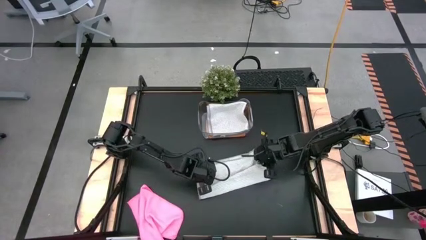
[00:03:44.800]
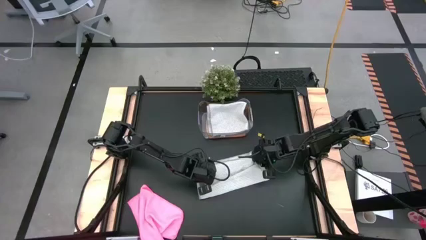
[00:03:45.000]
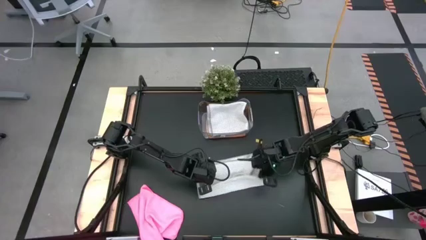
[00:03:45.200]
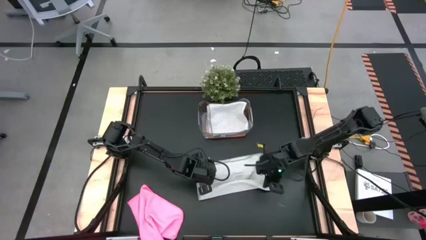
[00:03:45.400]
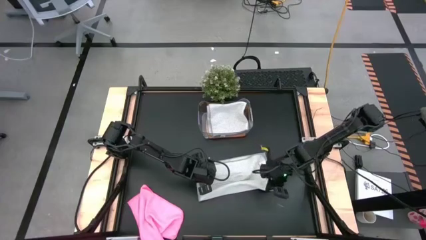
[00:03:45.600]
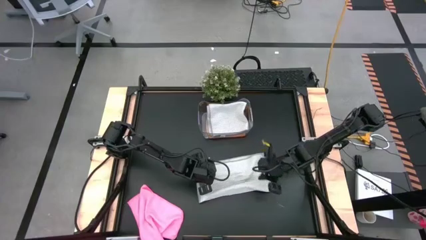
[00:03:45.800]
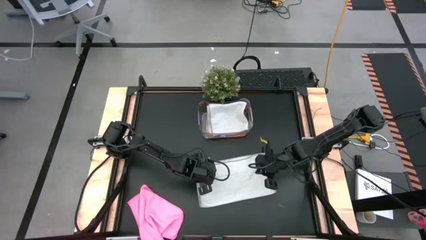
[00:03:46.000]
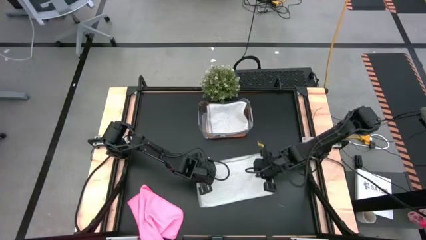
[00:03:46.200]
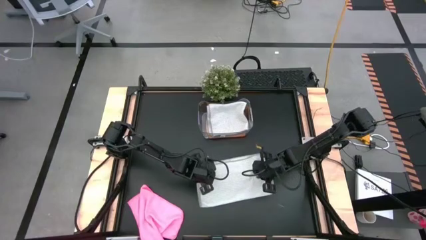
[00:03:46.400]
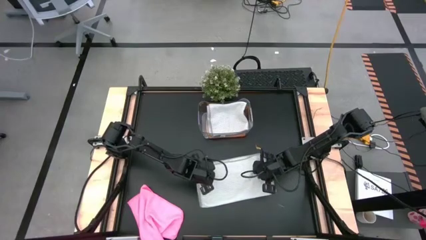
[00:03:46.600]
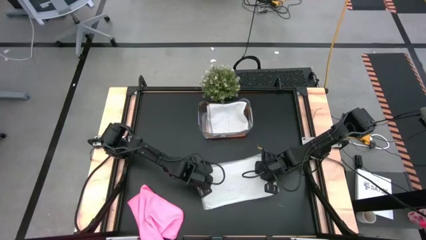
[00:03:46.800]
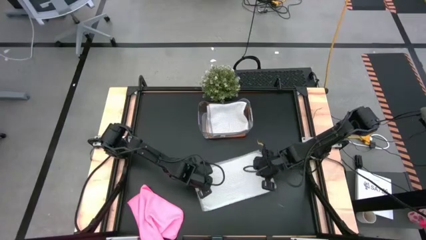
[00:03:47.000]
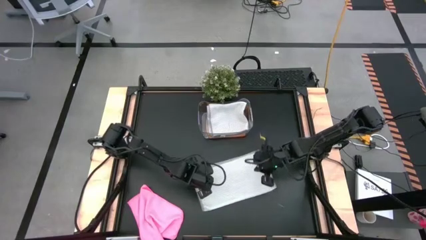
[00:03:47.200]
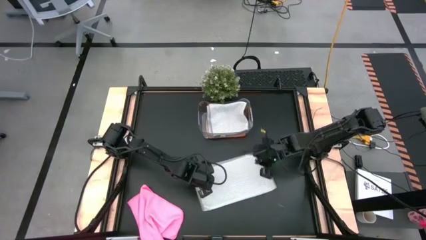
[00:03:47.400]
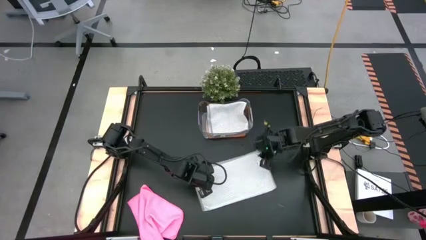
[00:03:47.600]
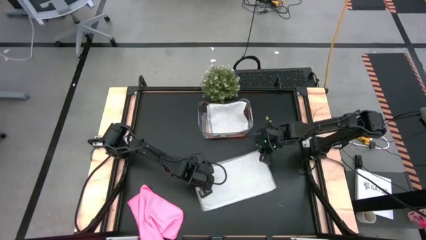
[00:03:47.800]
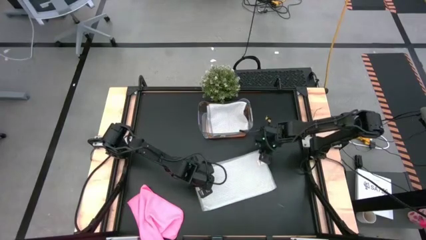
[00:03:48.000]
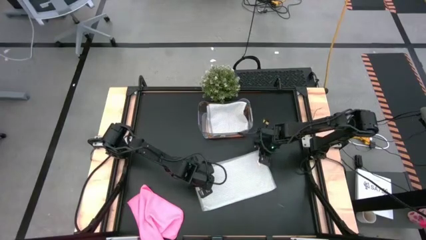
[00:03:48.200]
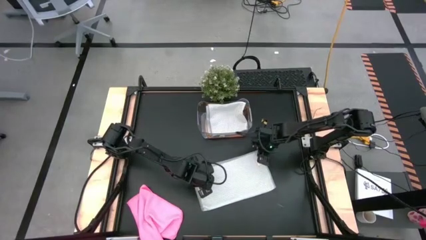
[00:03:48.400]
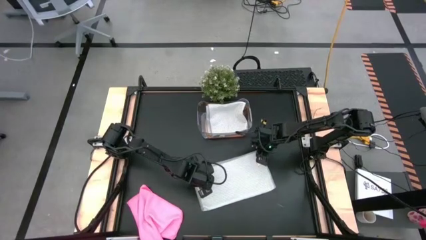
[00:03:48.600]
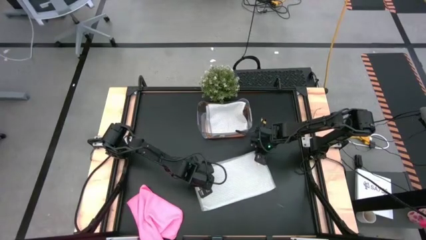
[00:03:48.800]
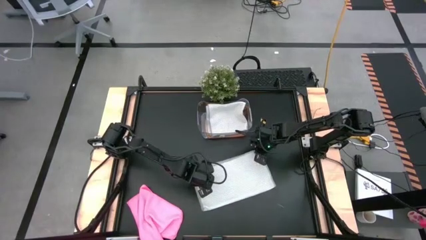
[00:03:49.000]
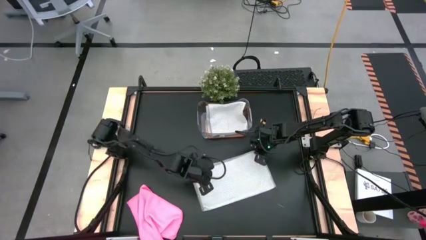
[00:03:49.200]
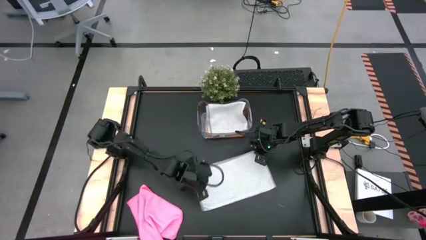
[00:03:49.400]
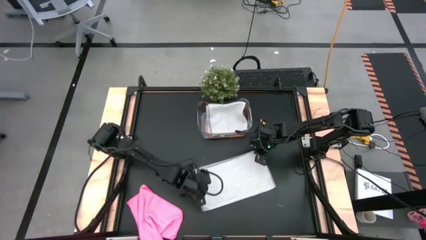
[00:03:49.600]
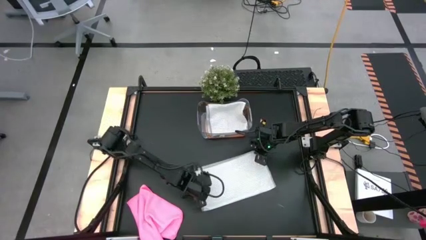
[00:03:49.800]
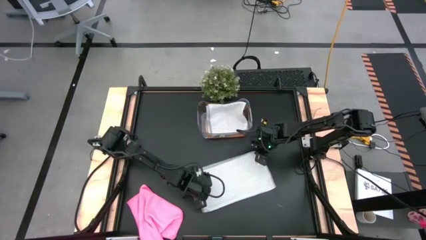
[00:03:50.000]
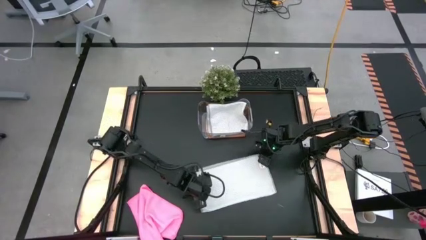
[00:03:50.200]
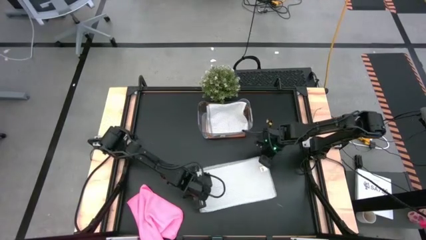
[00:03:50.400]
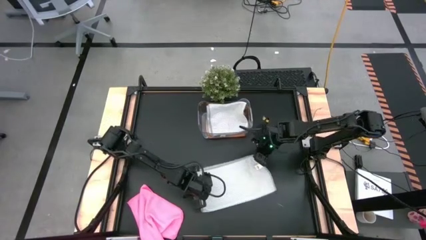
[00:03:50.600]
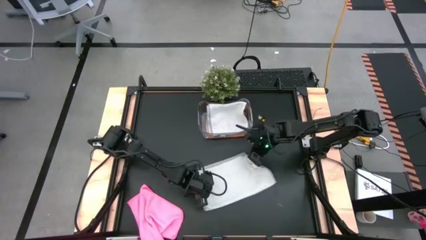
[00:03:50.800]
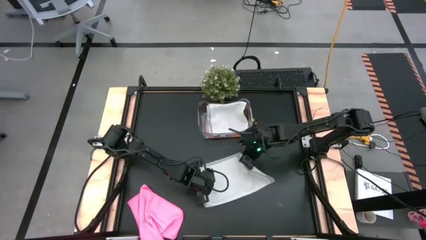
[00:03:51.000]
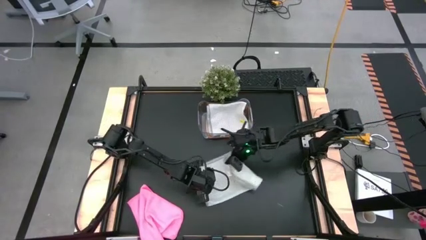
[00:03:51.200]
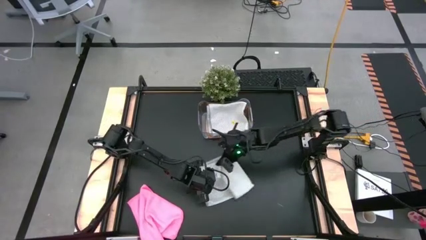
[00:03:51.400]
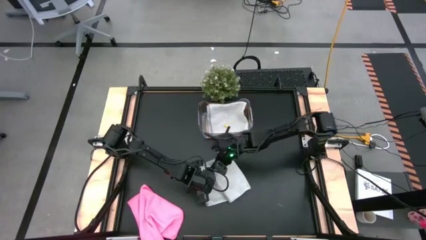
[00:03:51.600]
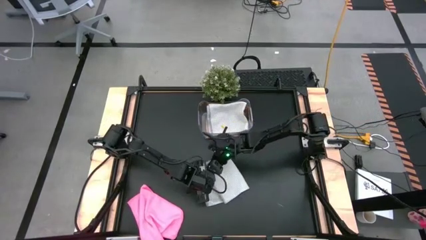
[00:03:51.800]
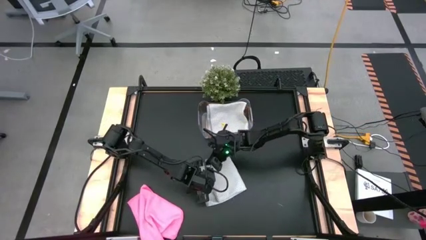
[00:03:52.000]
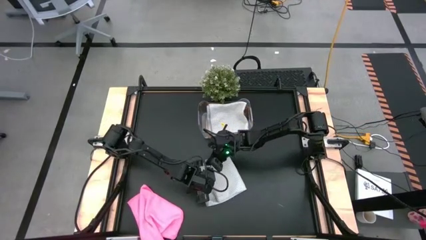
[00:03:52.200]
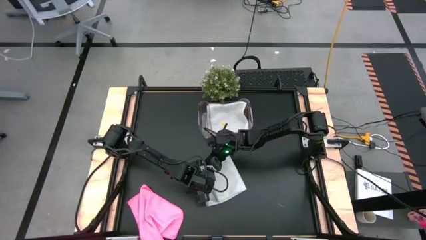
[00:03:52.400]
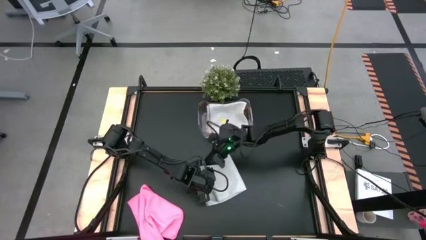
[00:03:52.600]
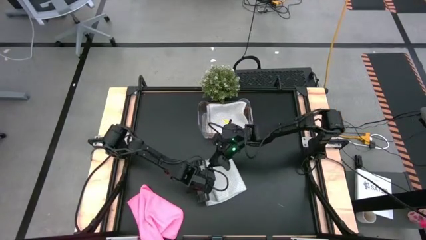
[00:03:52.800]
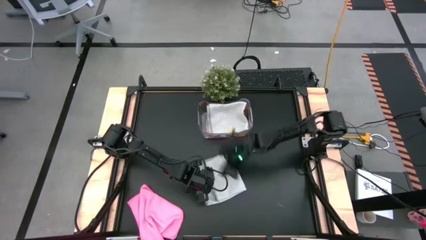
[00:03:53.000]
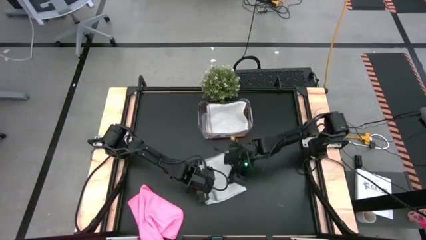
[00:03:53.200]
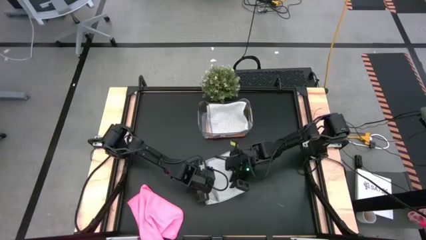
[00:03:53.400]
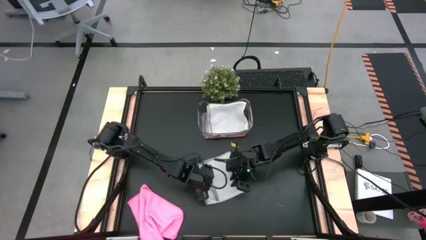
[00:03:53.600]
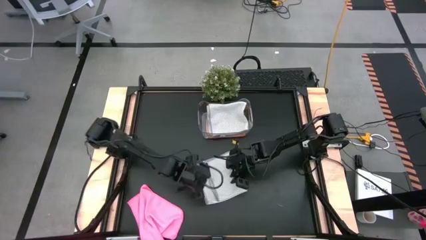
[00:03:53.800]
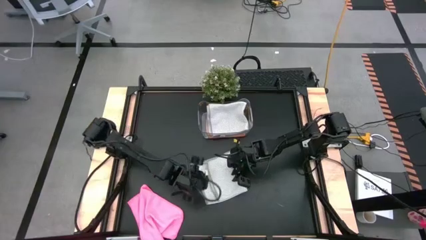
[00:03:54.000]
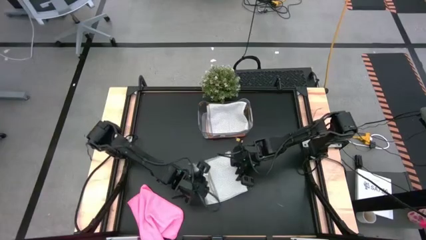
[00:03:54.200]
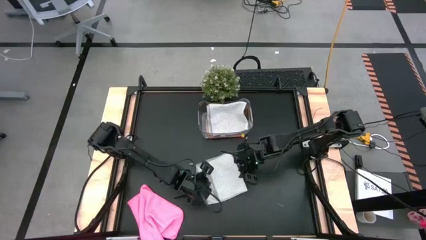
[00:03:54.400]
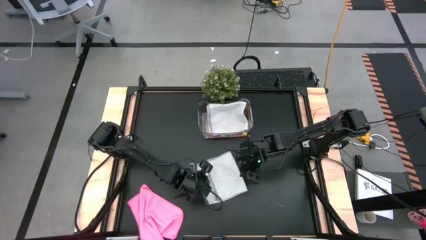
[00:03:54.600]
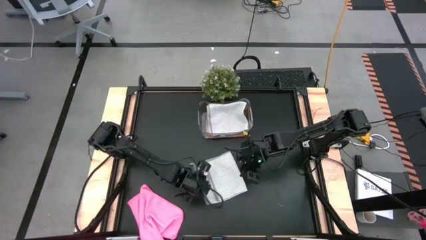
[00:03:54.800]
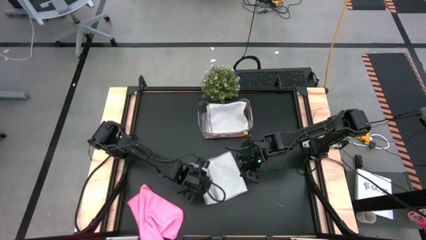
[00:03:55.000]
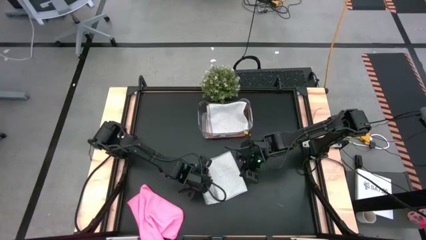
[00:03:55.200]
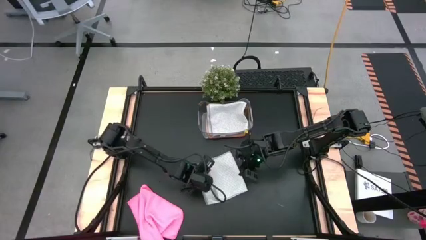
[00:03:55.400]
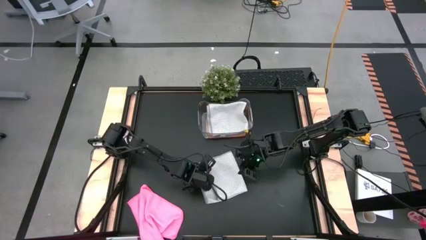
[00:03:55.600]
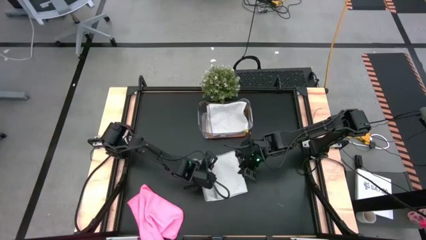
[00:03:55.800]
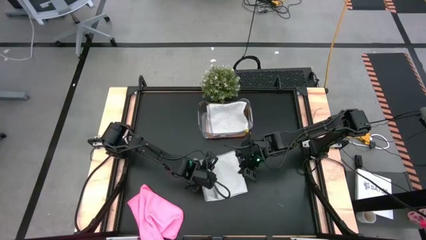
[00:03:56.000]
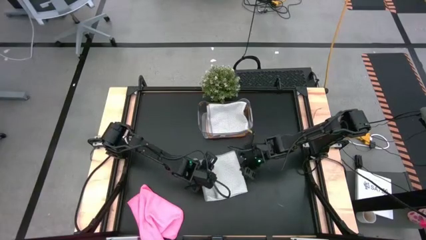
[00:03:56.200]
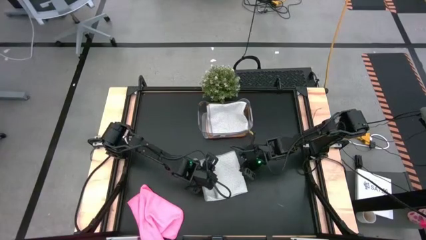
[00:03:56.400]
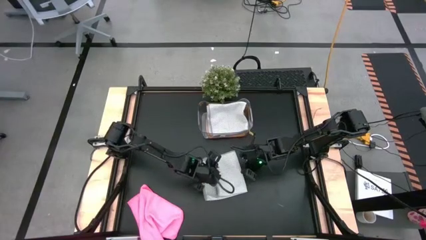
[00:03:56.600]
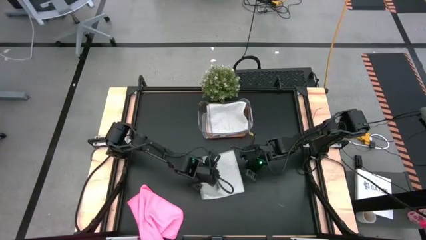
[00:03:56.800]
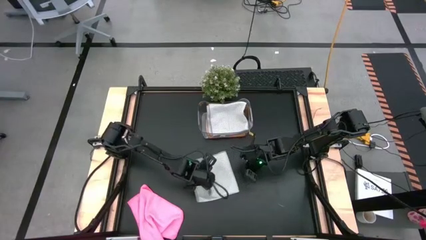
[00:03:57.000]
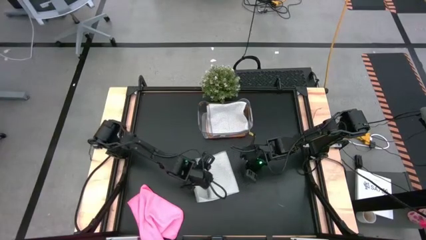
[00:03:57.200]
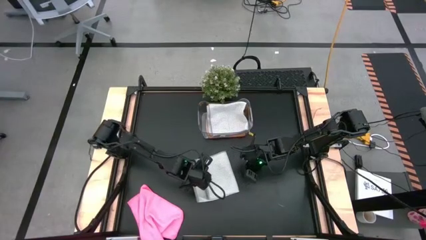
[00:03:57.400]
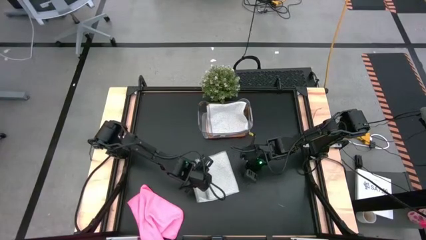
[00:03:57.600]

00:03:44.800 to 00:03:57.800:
Task: Fold microfiber towels
Fold the gray microfiber towel on the table
